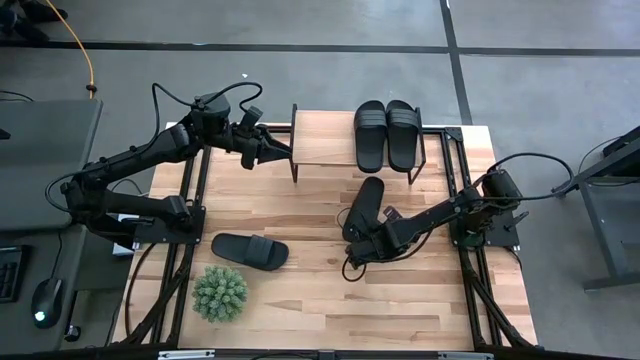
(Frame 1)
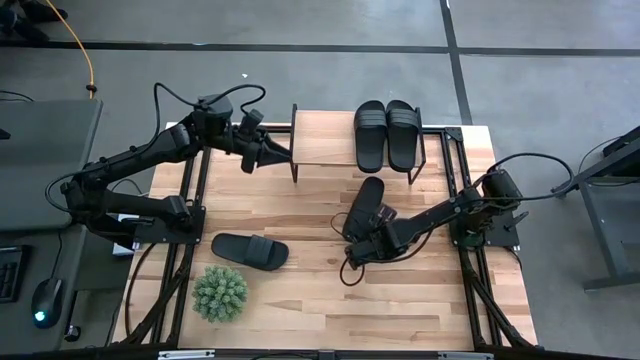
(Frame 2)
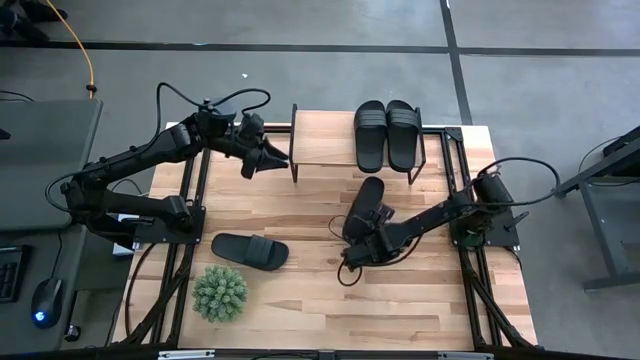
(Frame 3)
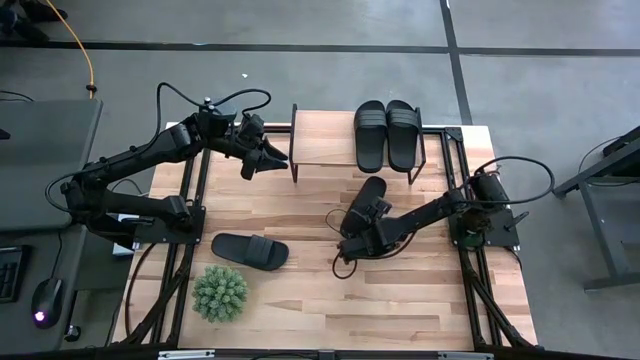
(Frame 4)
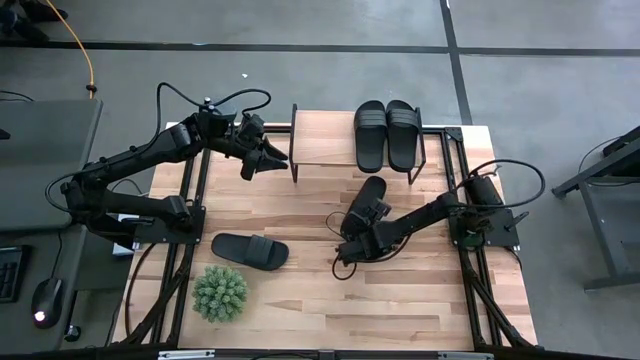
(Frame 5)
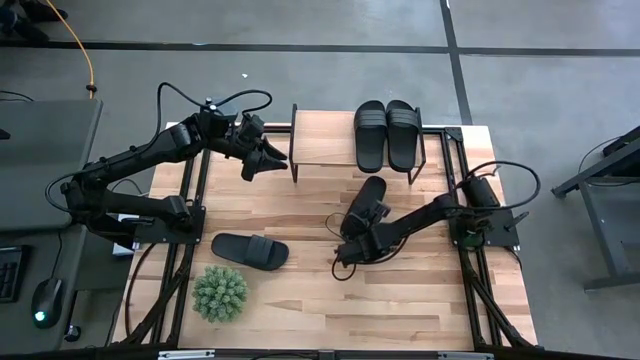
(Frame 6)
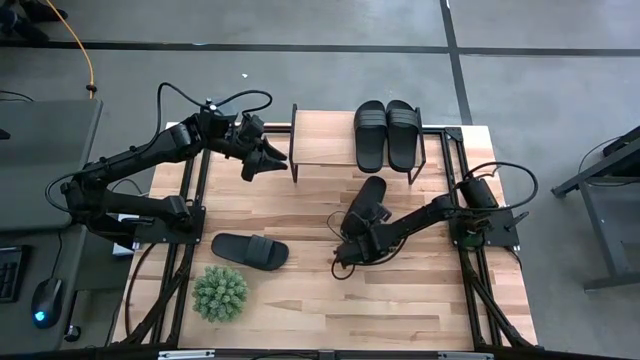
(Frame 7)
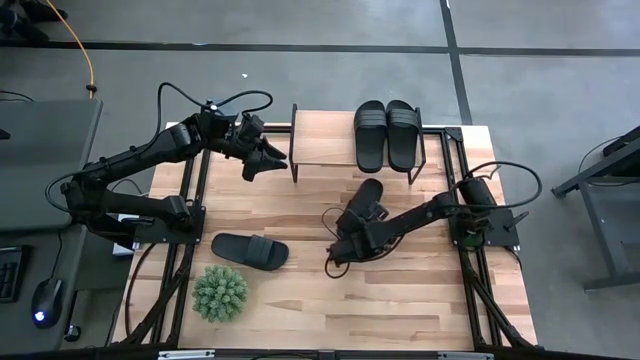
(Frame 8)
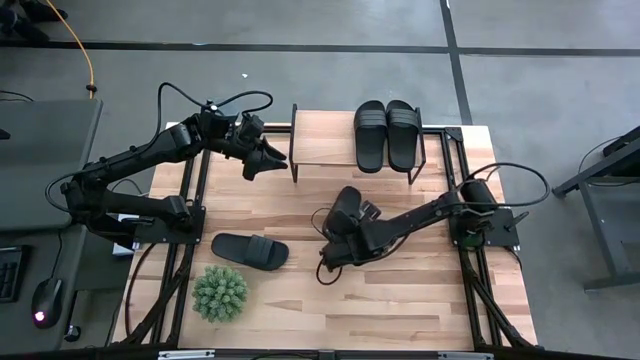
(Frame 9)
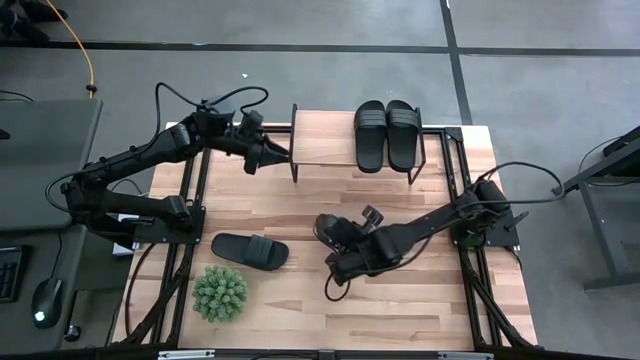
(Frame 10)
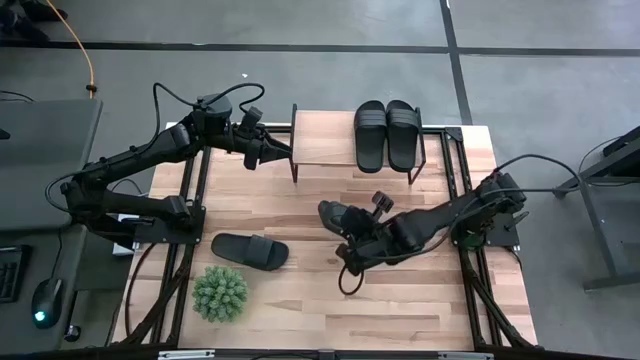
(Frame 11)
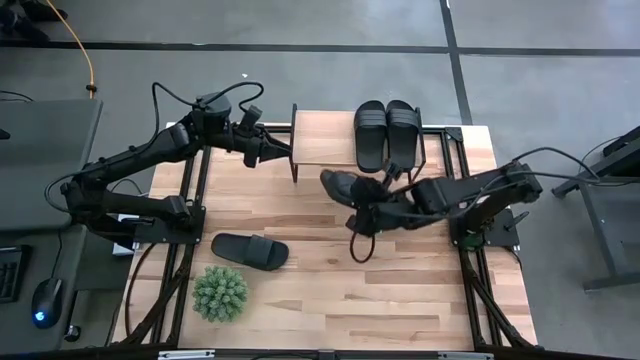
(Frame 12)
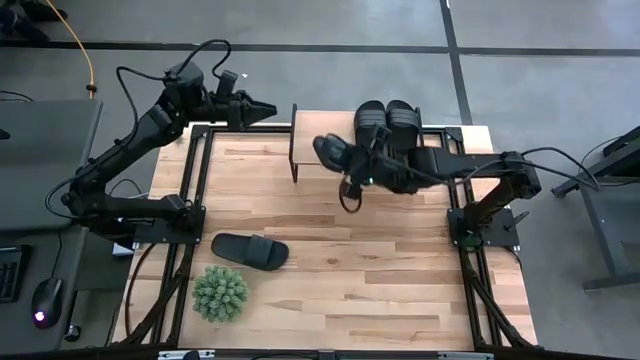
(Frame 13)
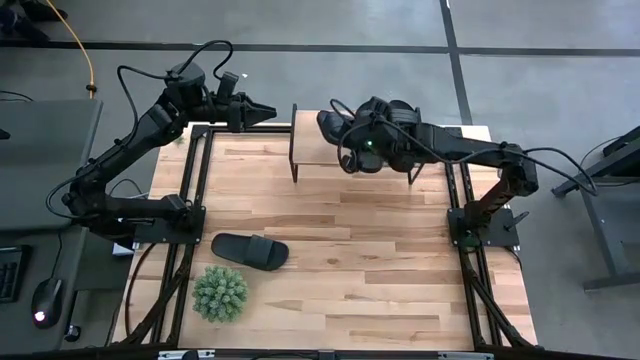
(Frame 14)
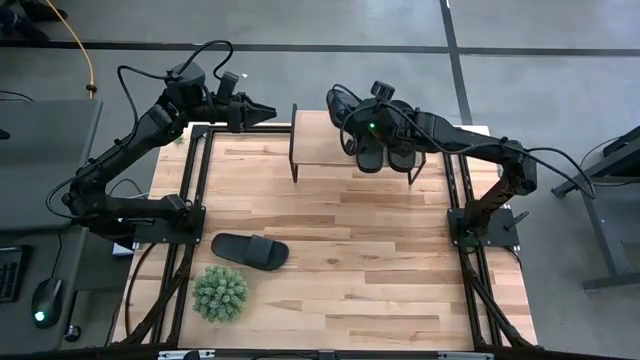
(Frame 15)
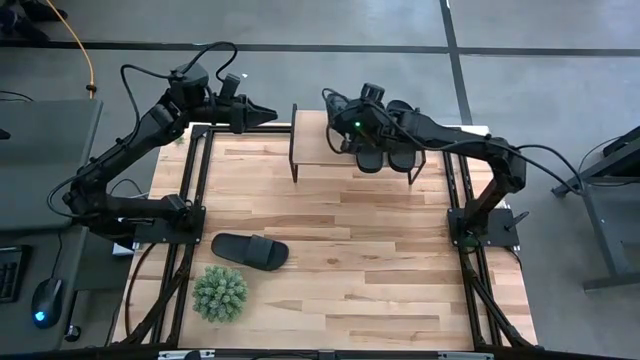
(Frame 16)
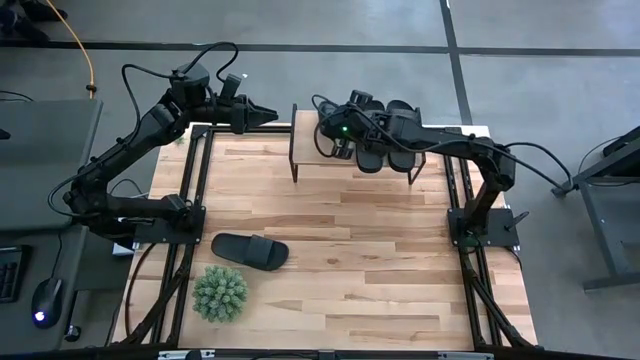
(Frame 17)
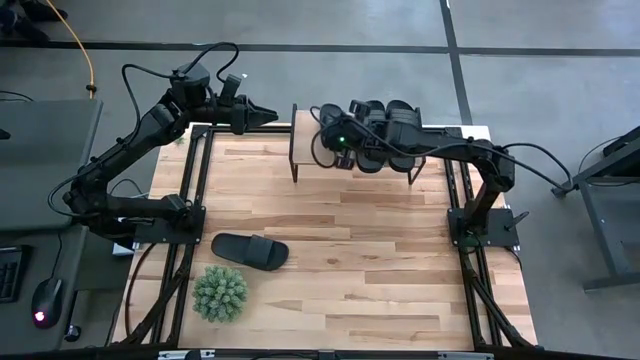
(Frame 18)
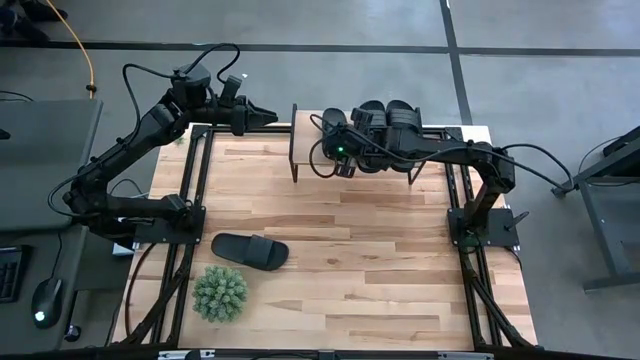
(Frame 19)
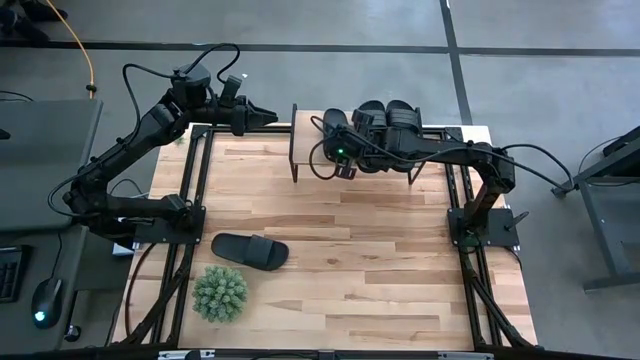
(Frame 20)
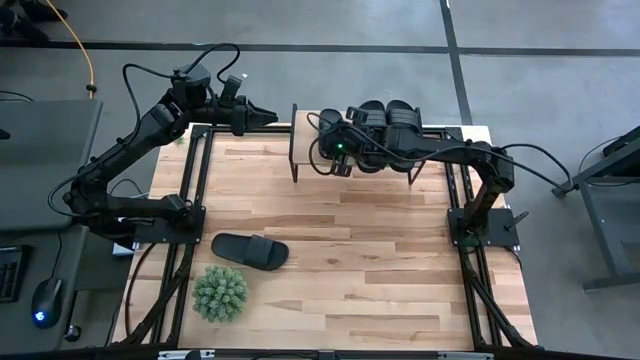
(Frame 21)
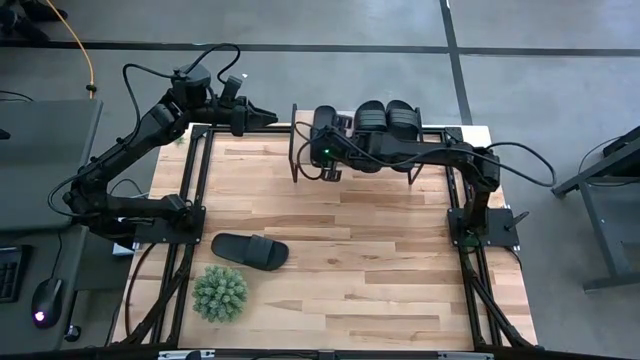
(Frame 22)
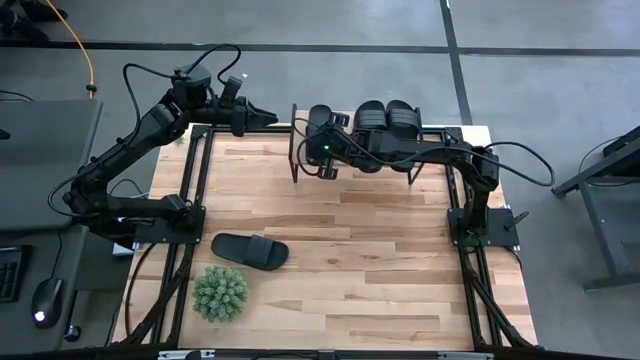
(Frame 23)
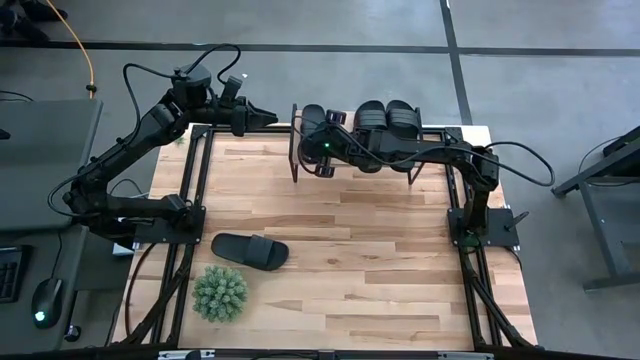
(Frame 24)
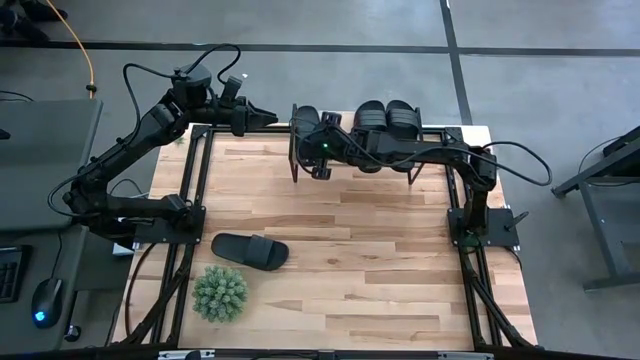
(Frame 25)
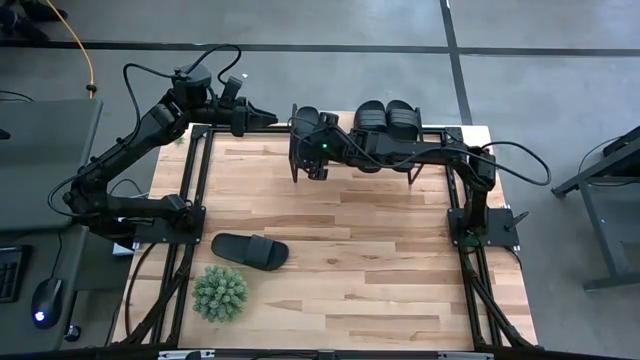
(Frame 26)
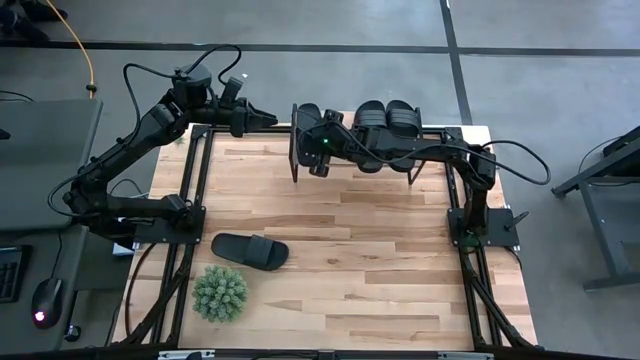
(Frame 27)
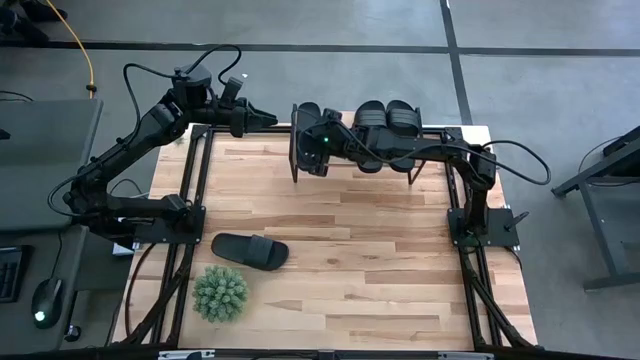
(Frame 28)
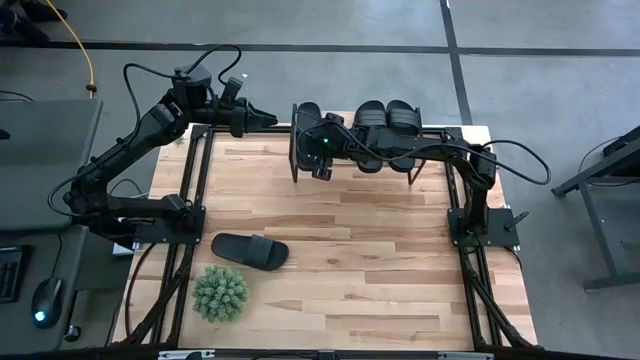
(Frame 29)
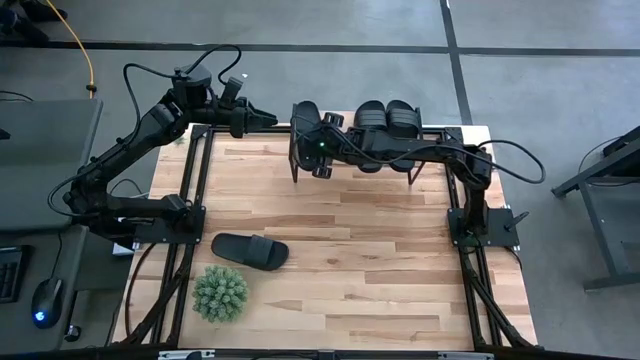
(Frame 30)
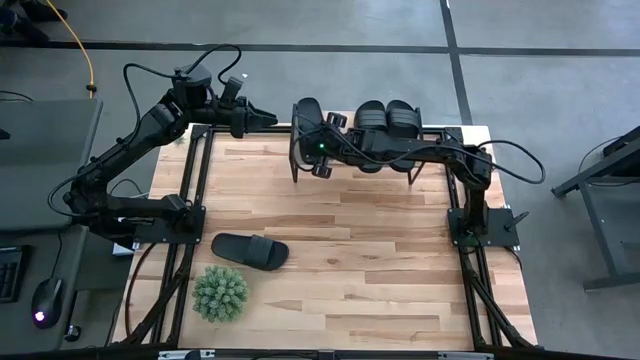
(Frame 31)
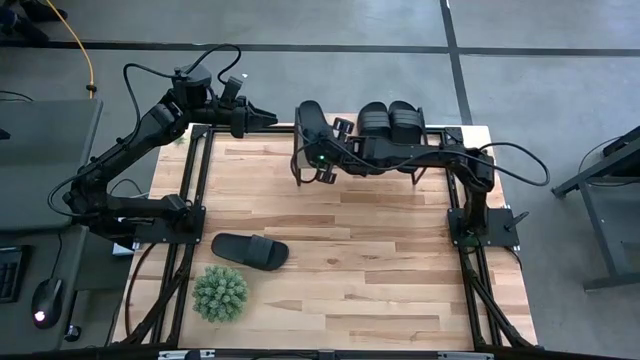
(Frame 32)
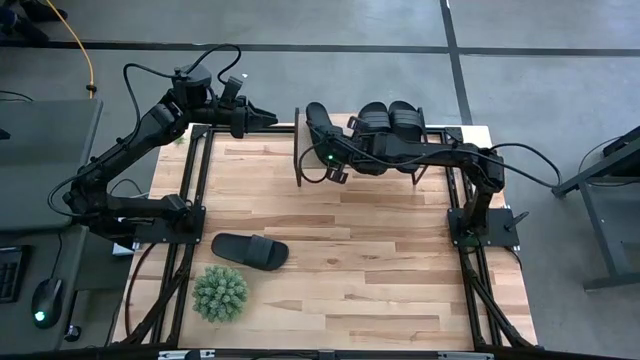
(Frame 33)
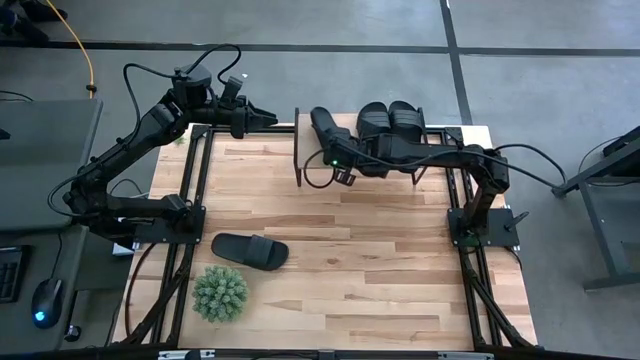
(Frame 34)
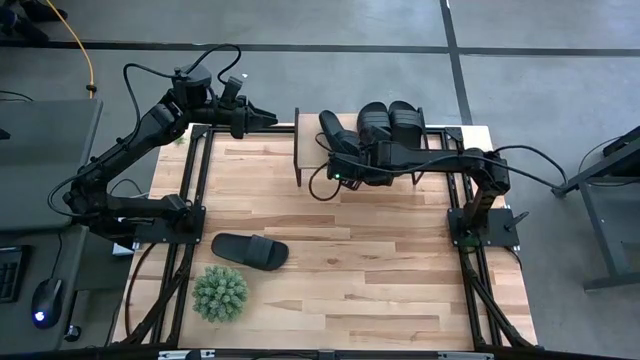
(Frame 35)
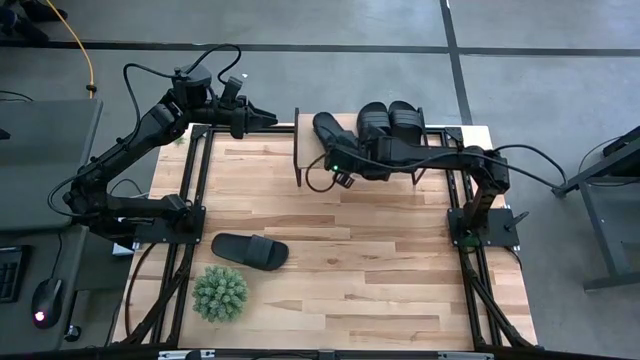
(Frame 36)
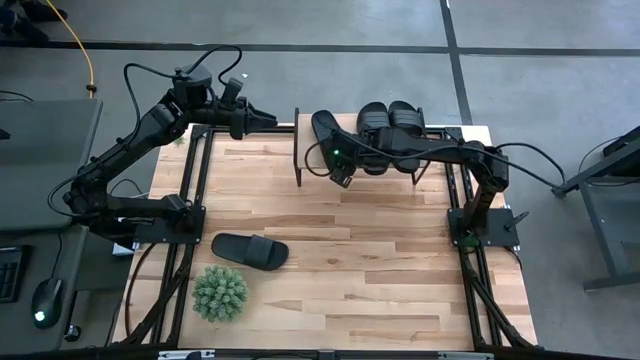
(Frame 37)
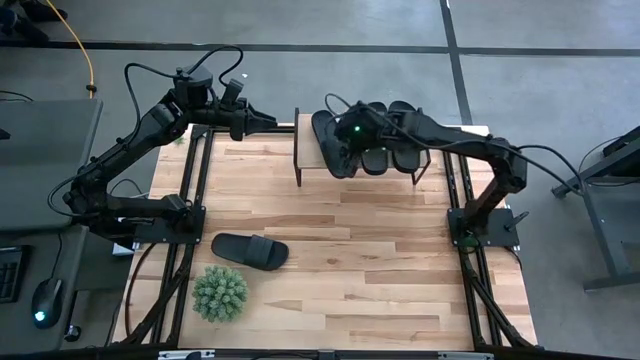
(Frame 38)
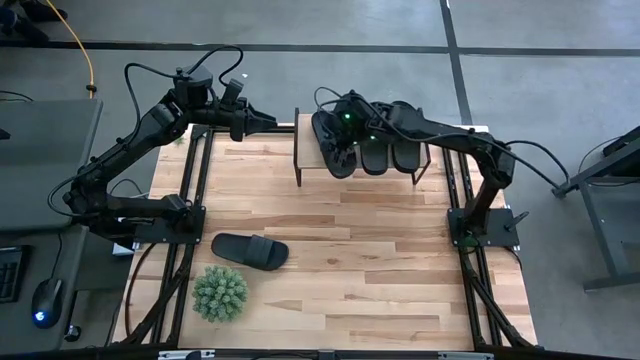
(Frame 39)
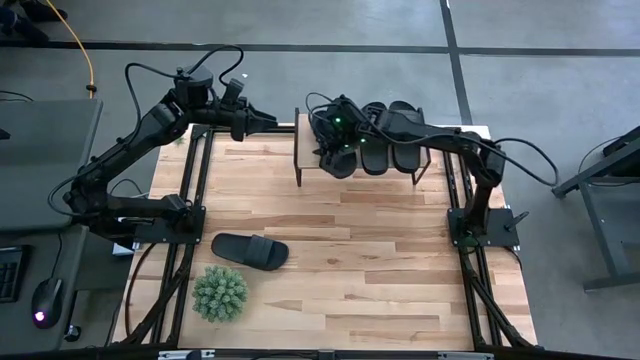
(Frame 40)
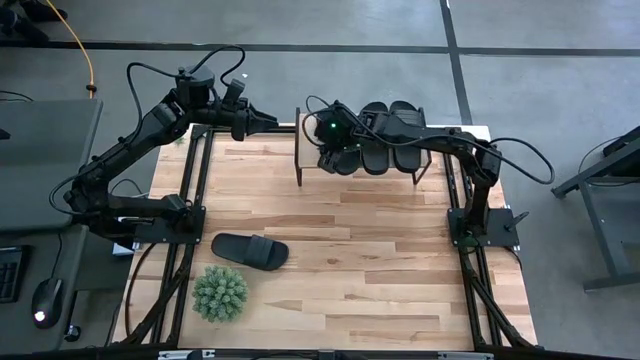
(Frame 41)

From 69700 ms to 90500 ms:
Task: Pick and place slides into the shelf
Put the black slipper on the shelf

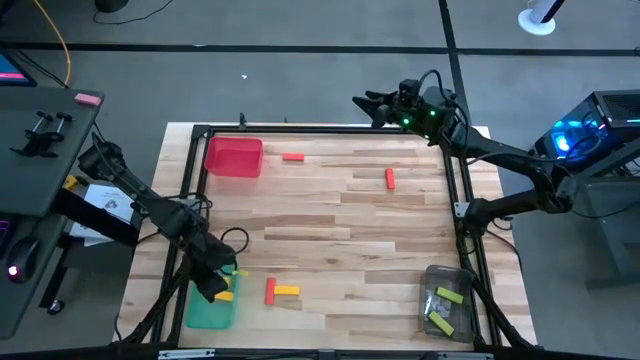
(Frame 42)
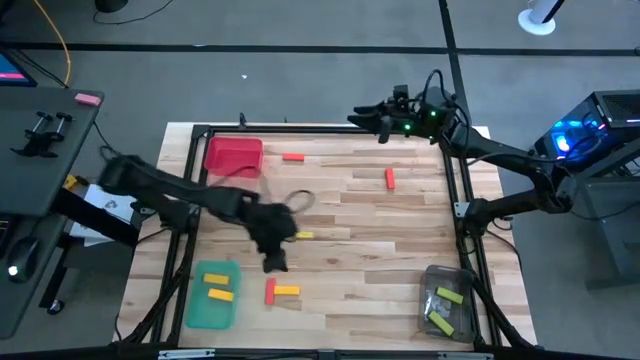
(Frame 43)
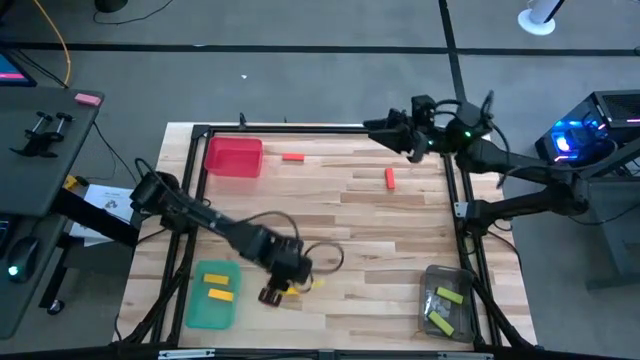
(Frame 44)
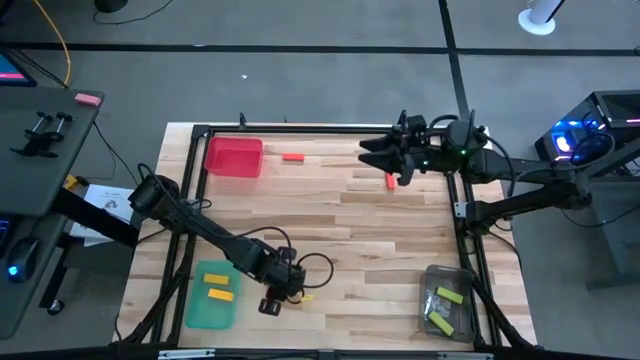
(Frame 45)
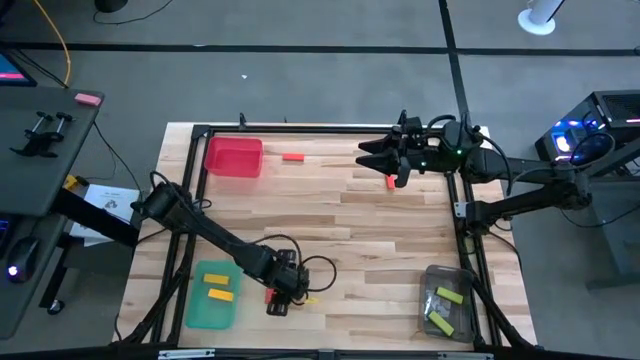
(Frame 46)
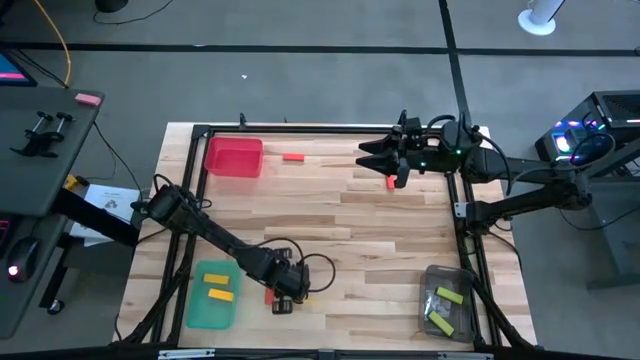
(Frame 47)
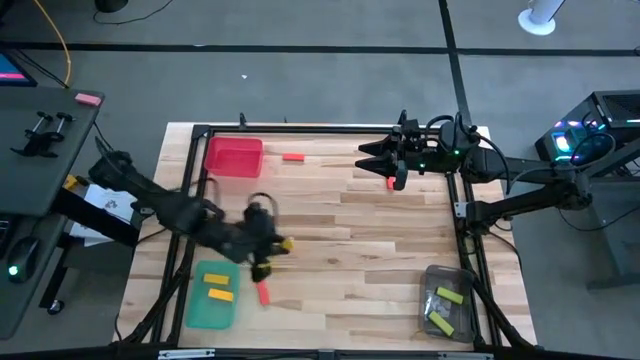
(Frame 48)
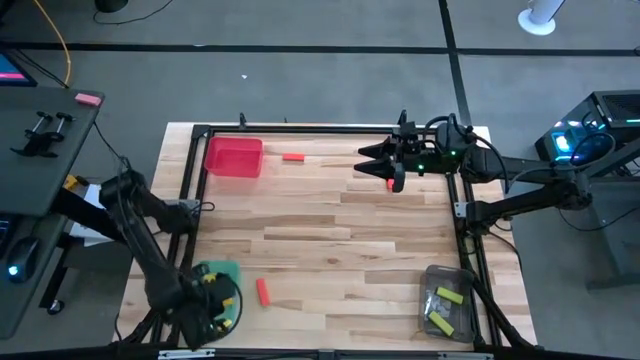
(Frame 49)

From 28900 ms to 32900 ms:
Task: Sort blocks
Put the yellow block into the green bin
